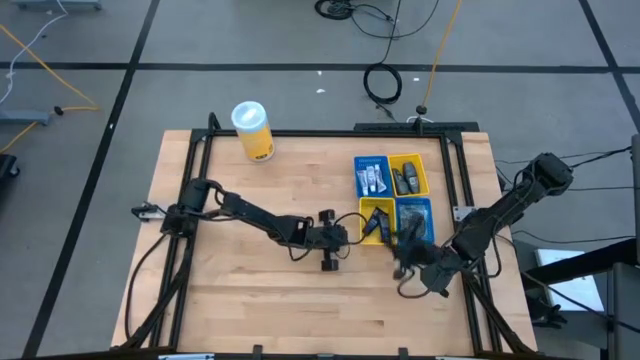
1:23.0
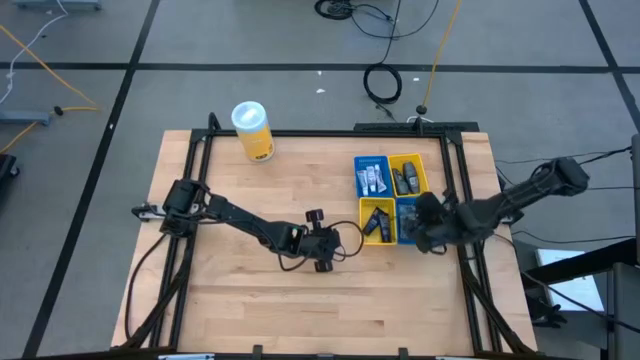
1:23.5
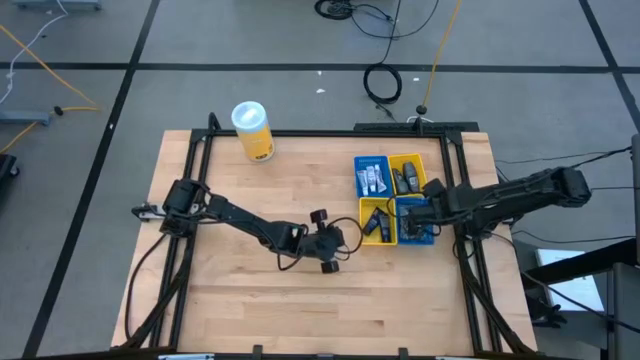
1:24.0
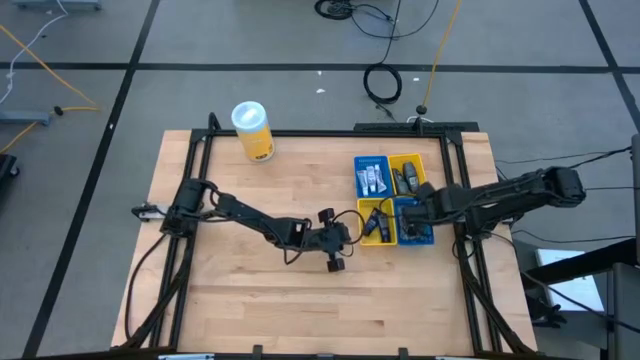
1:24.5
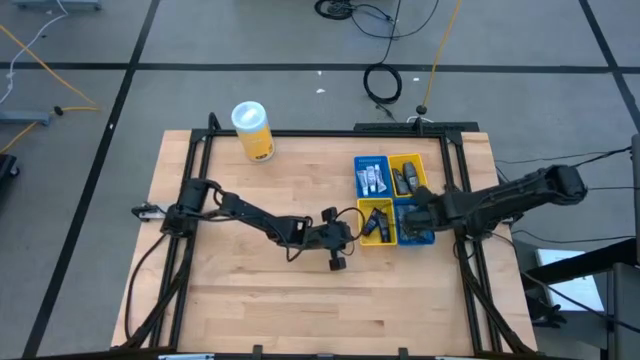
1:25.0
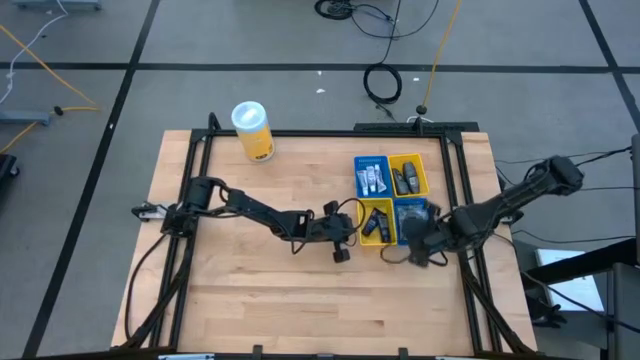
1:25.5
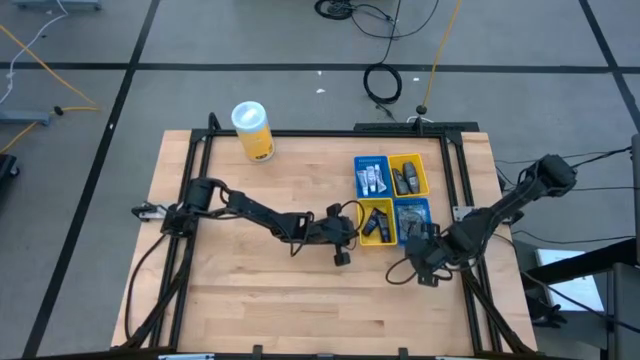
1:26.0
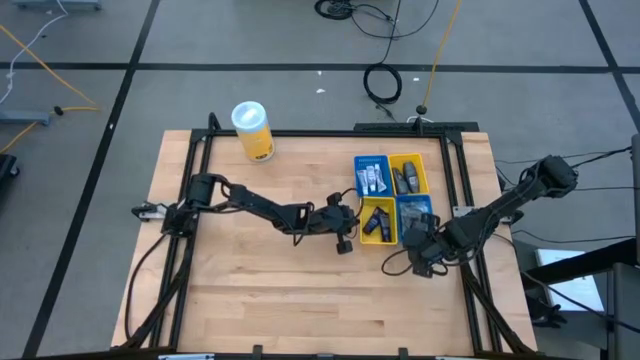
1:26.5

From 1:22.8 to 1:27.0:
Task: Pick & Place Travel size toiletries
Adjust the bottom blue bin

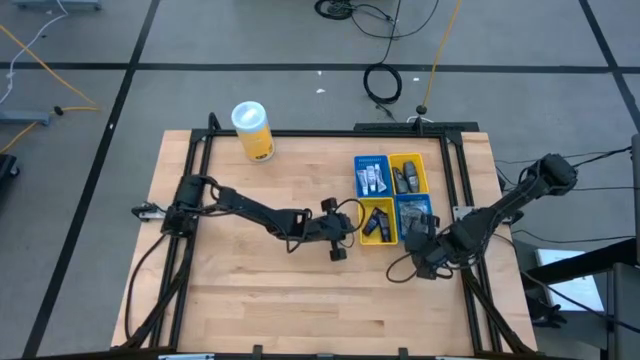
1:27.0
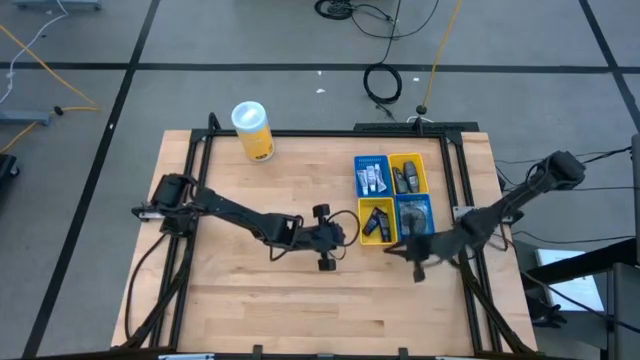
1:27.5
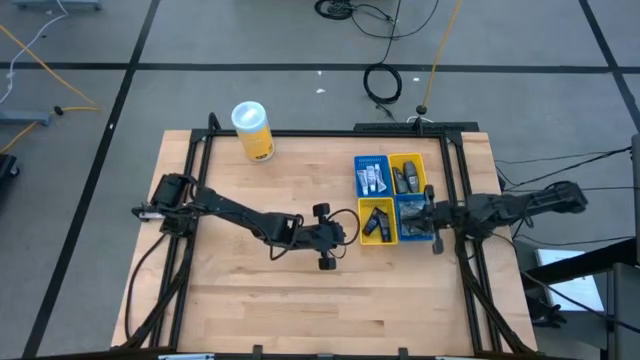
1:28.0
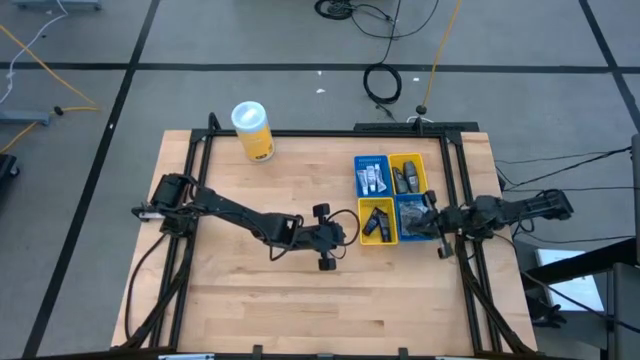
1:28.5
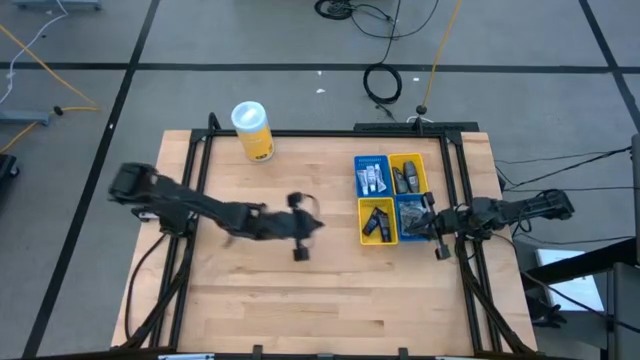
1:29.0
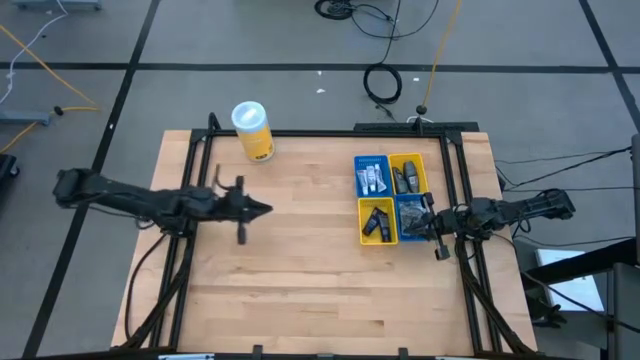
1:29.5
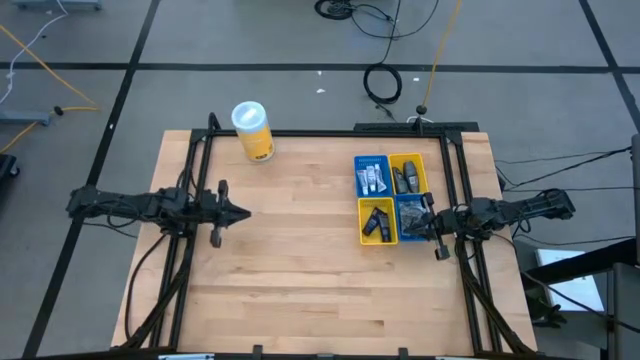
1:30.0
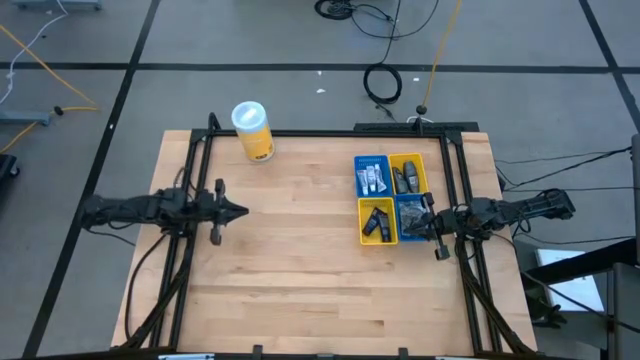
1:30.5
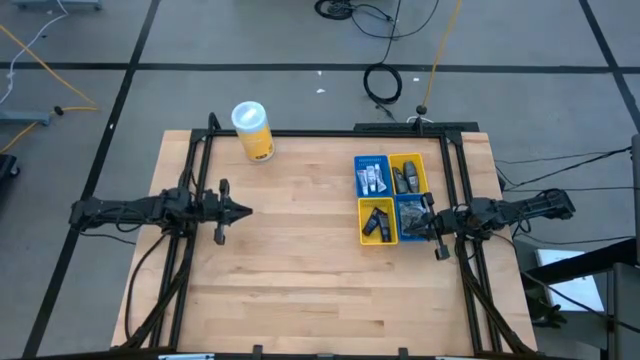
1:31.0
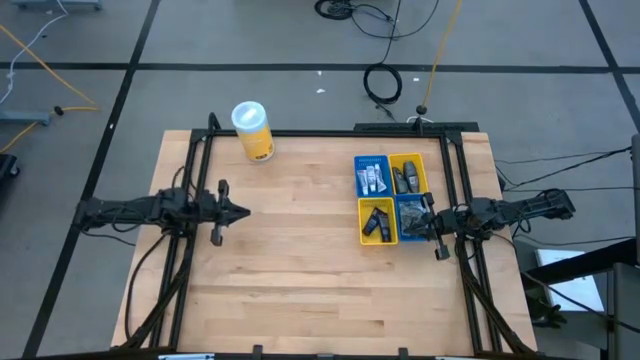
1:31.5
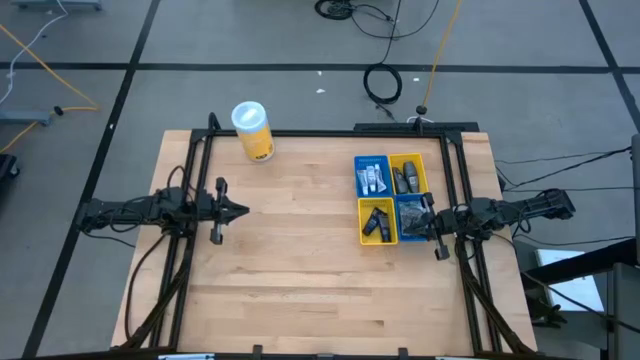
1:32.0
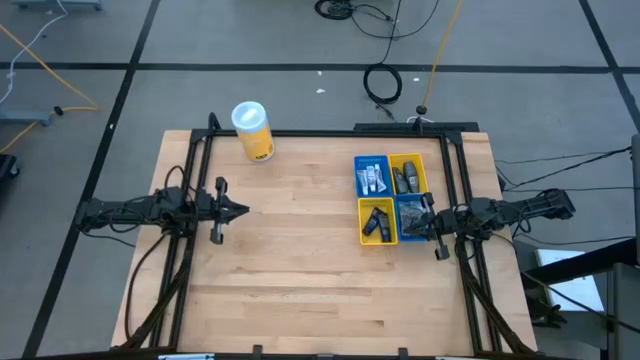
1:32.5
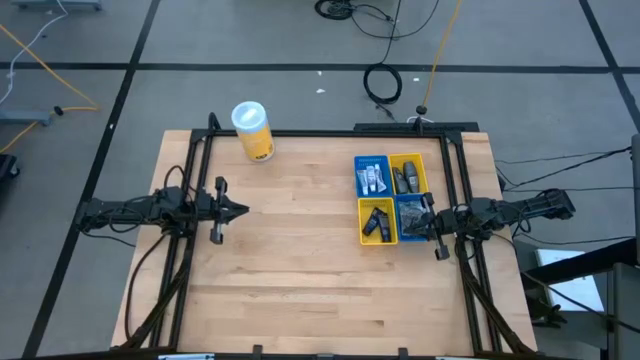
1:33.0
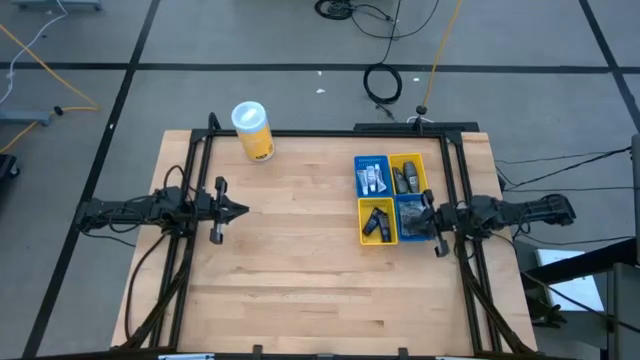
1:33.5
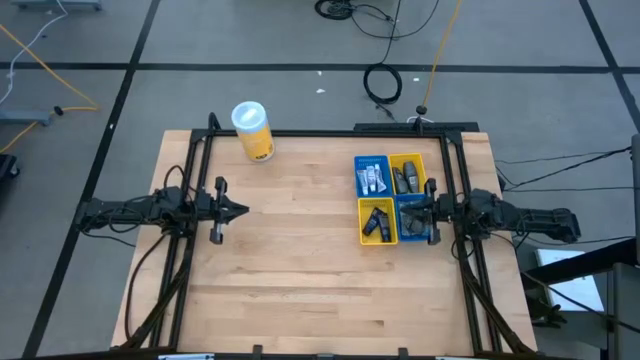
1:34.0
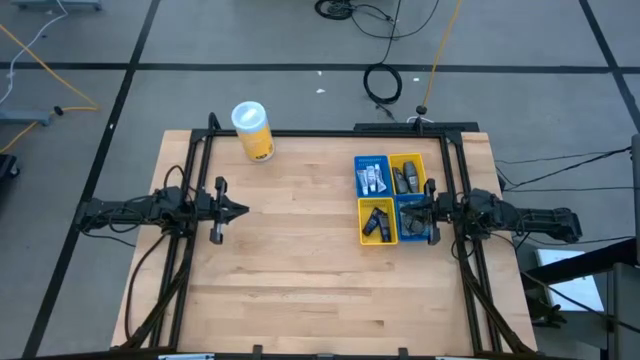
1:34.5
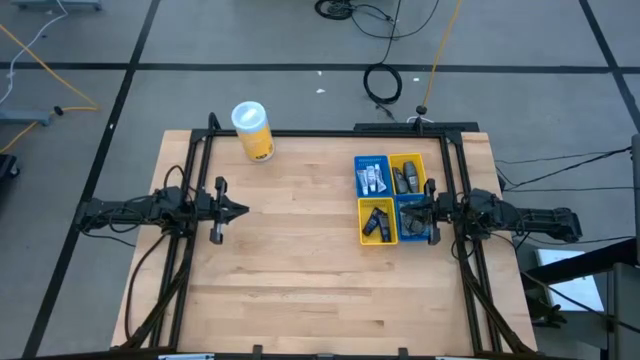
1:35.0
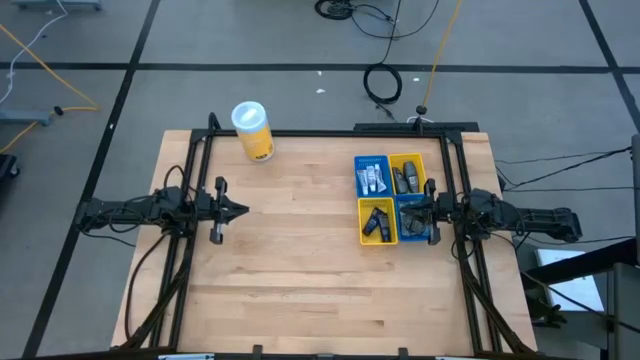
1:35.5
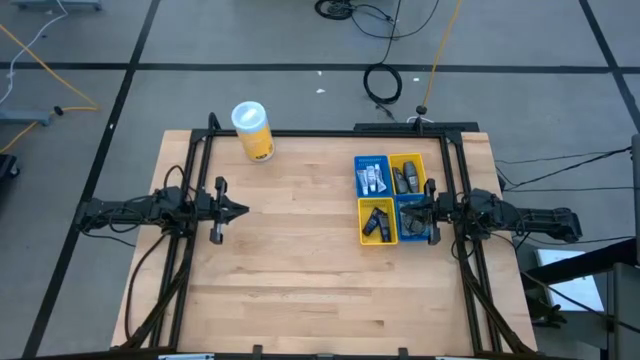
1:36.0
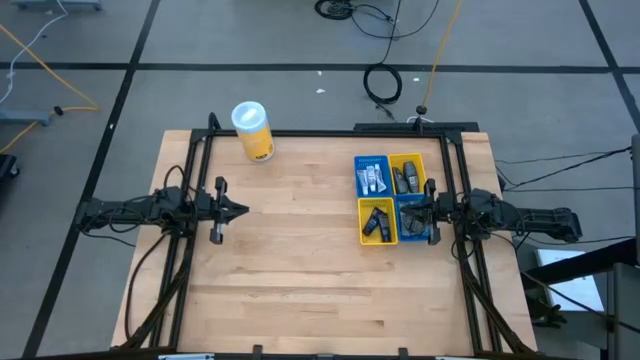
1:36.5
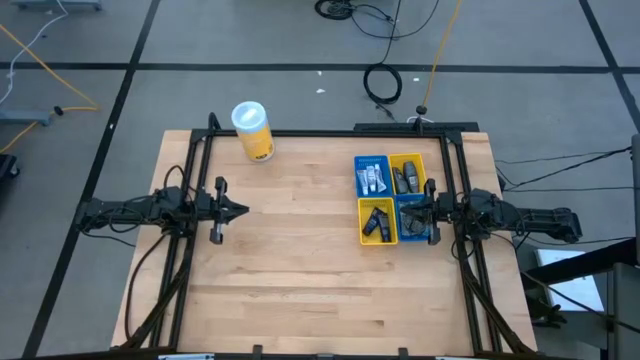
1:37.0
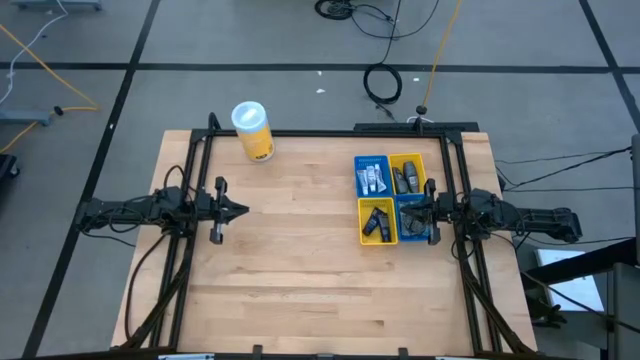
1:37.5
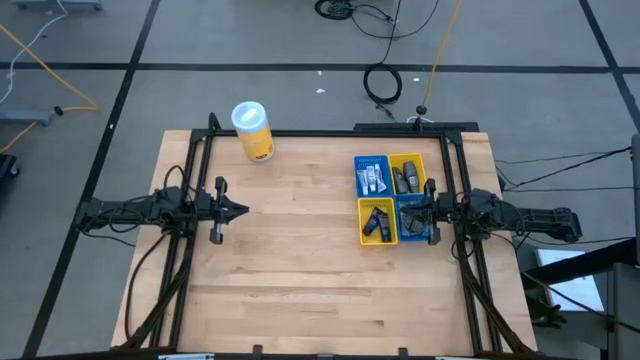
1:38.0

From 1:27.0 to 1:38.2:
Return to Home Position

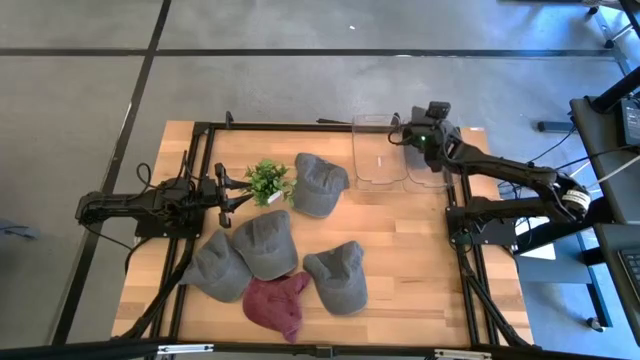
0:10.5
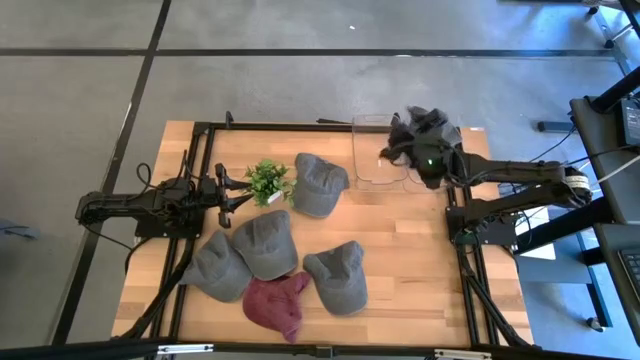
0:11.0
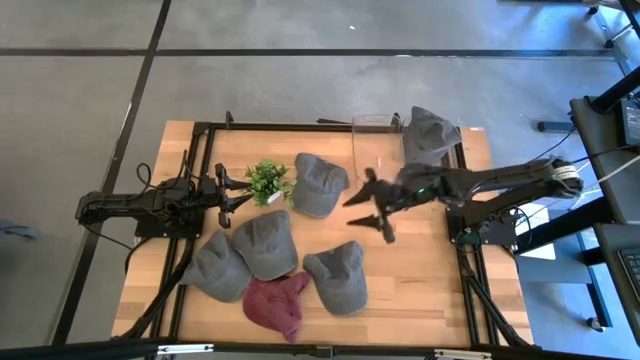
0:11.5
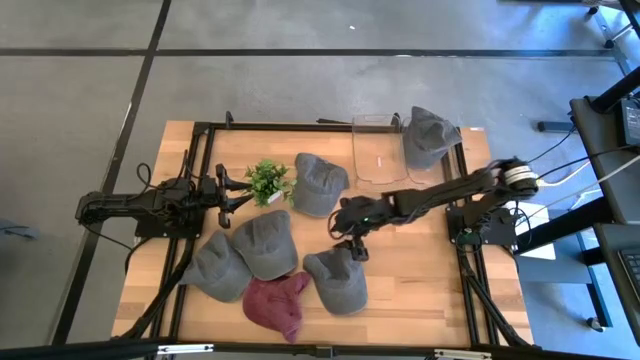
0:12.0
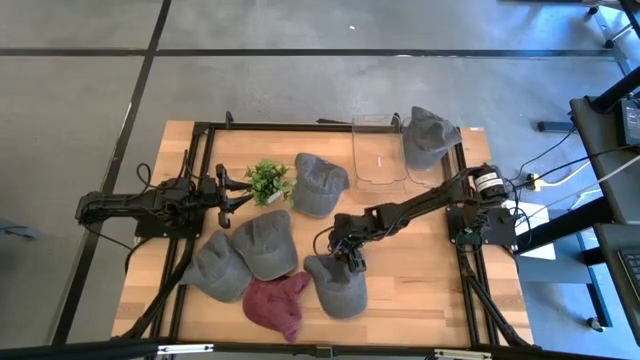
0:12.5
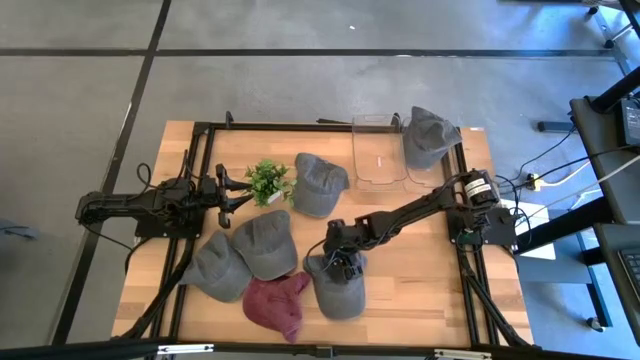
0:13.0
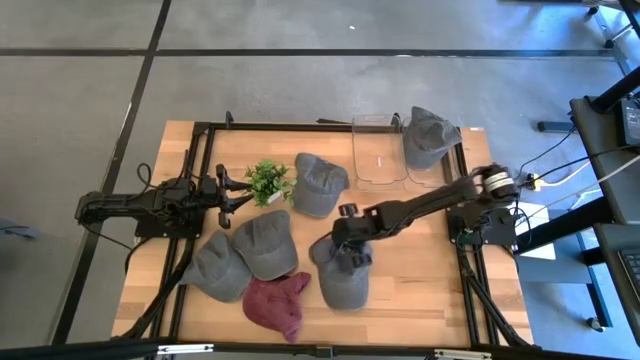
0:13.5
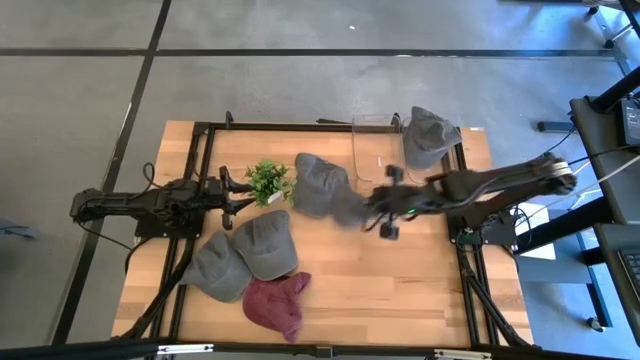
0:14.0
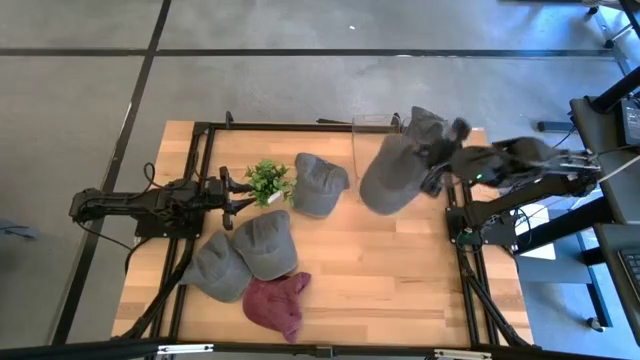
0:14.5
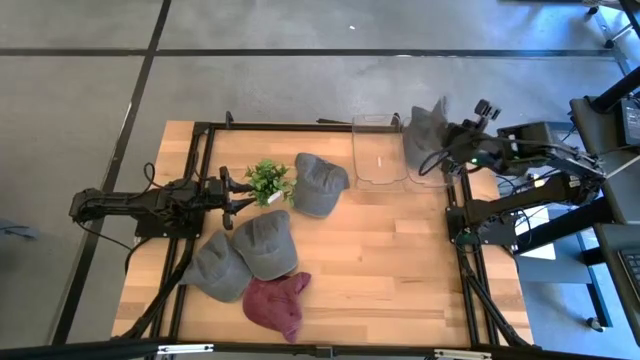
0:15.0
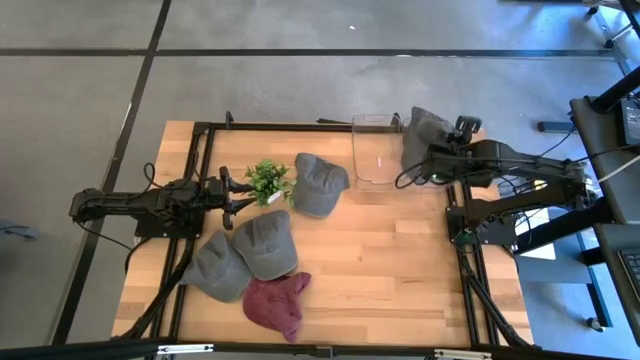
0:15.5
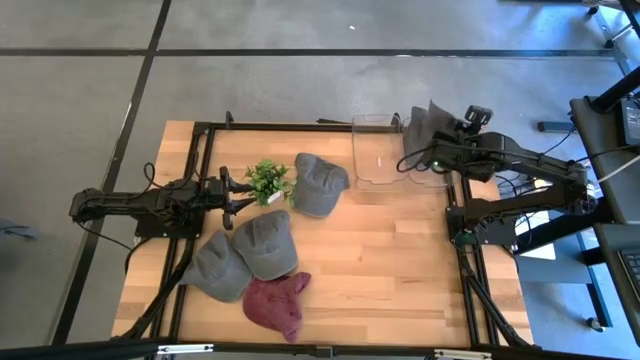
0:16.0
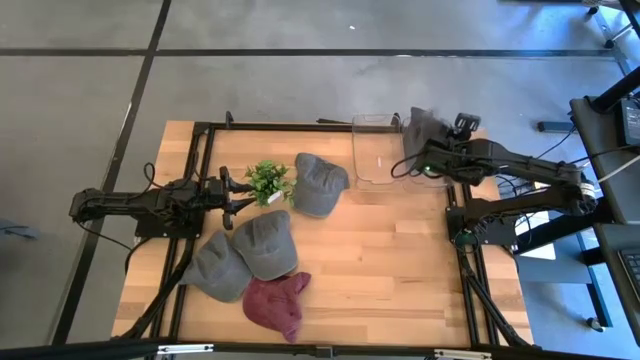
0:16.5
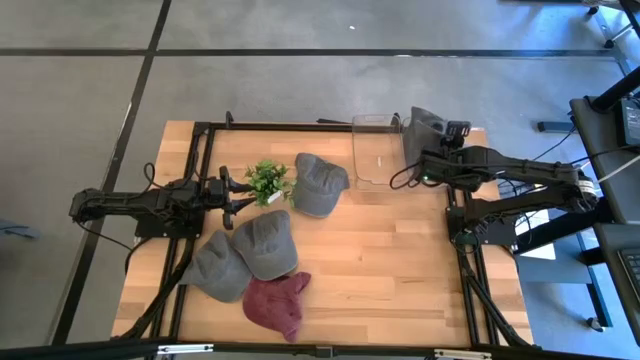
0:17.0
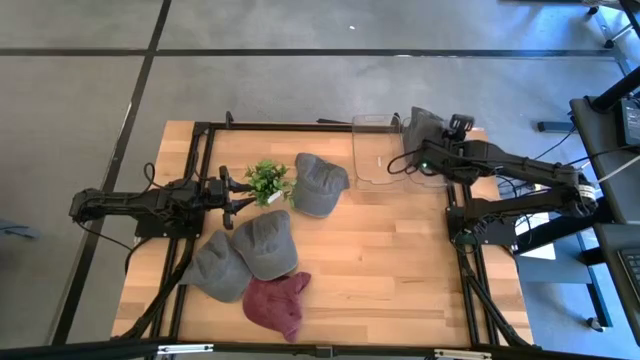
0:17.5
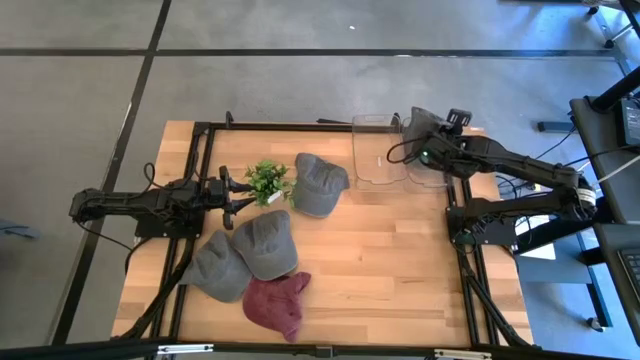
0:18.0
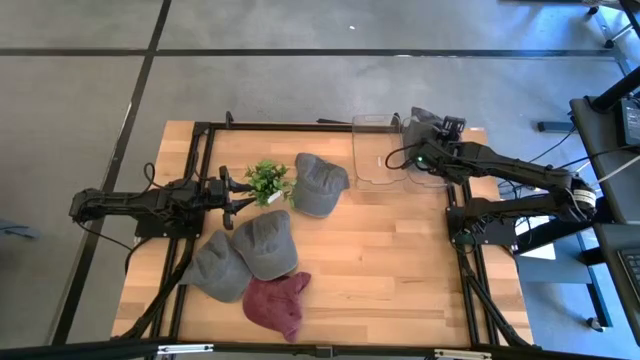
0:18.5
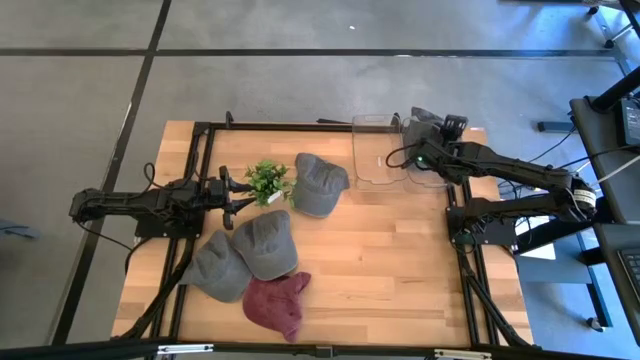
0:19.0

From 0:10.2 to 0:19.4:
Task: Pick & Place hat
Put the gray cap into the right transparent bin
